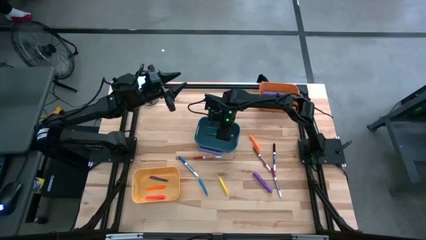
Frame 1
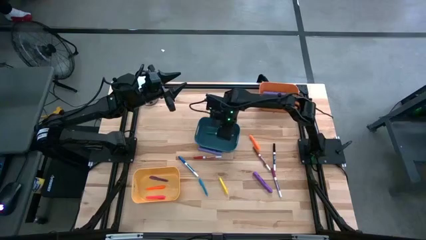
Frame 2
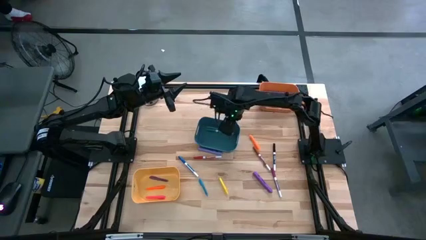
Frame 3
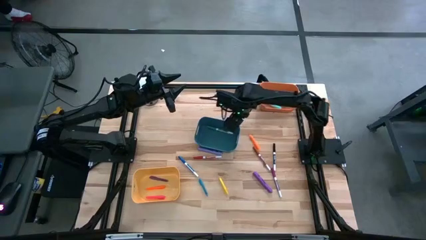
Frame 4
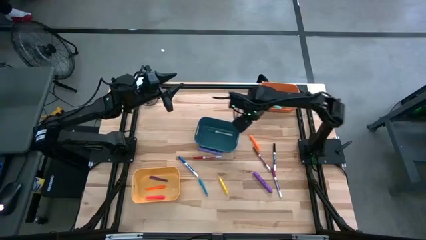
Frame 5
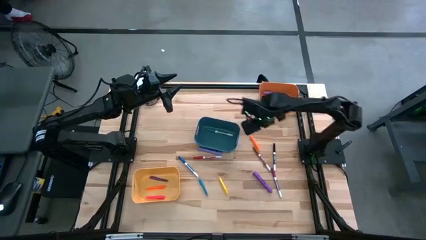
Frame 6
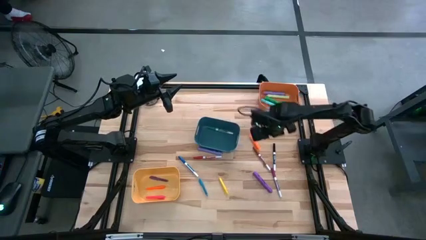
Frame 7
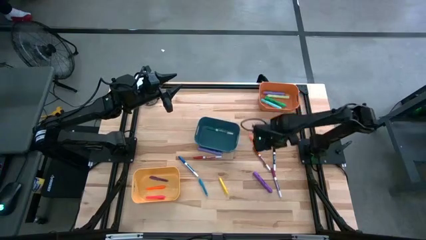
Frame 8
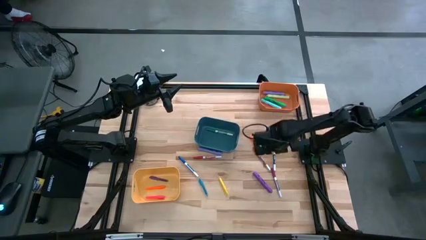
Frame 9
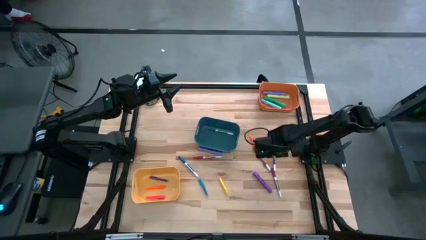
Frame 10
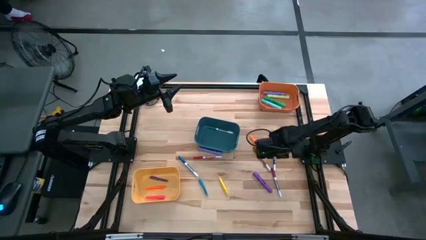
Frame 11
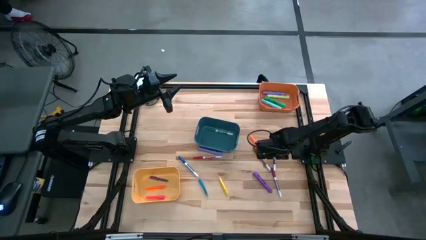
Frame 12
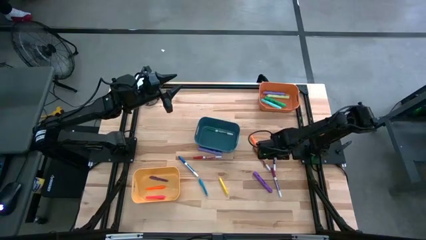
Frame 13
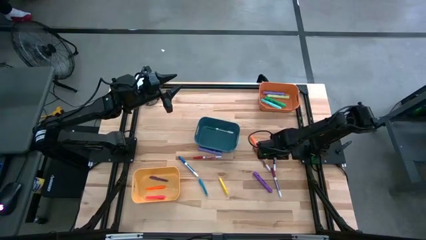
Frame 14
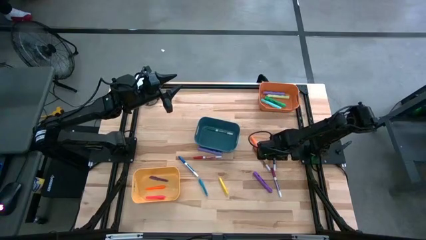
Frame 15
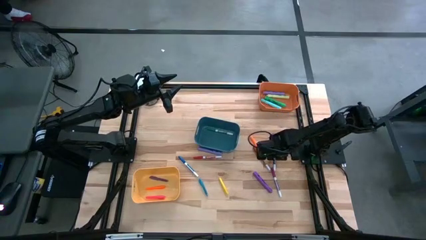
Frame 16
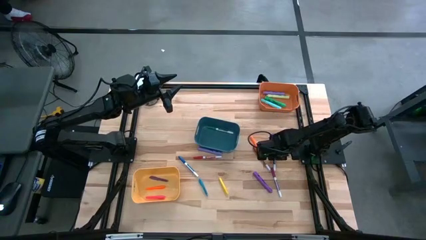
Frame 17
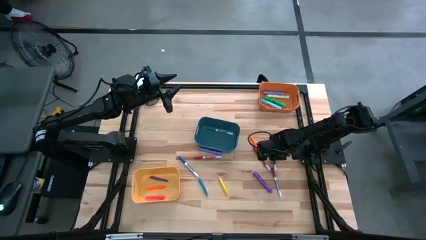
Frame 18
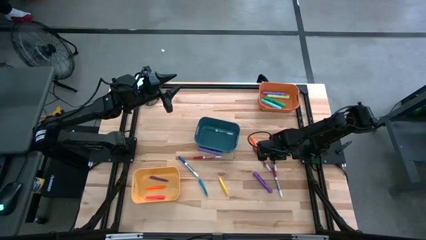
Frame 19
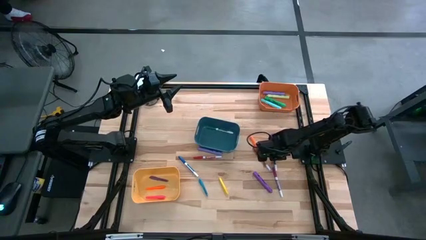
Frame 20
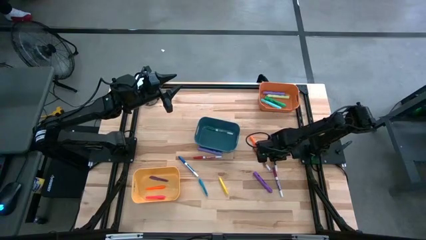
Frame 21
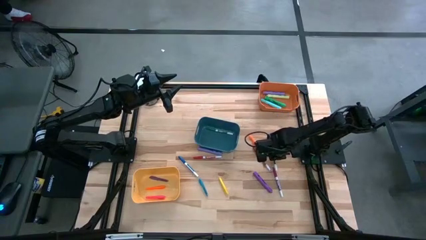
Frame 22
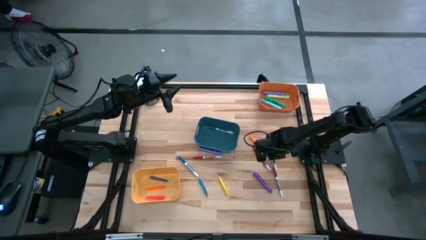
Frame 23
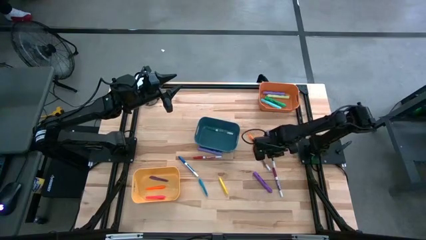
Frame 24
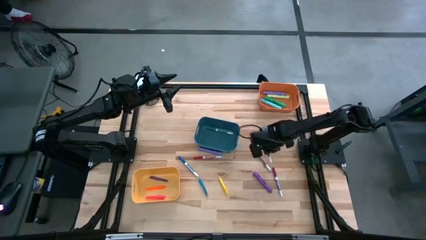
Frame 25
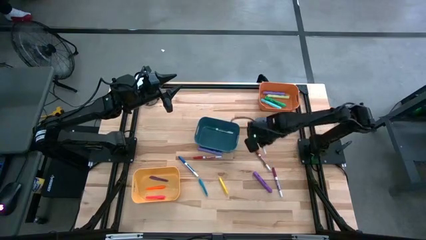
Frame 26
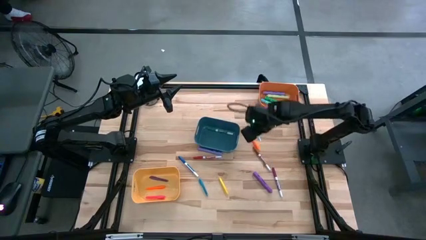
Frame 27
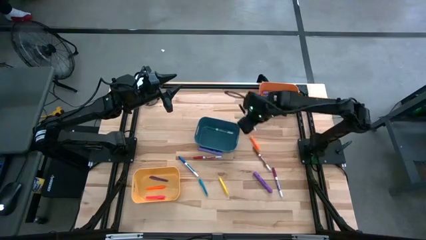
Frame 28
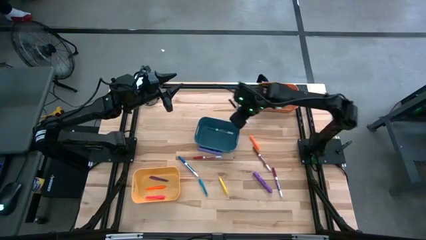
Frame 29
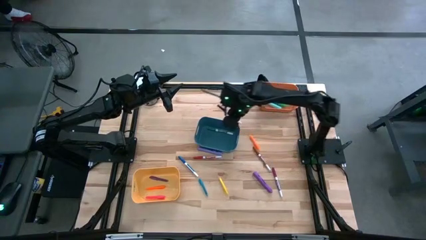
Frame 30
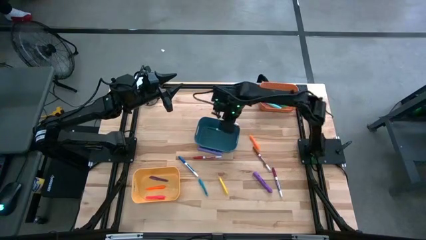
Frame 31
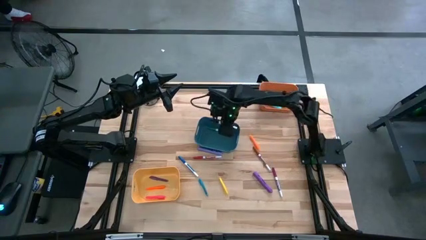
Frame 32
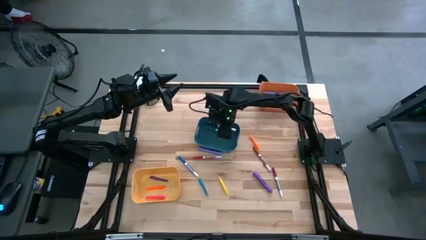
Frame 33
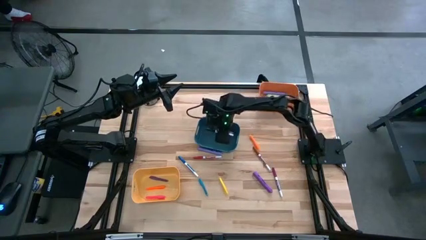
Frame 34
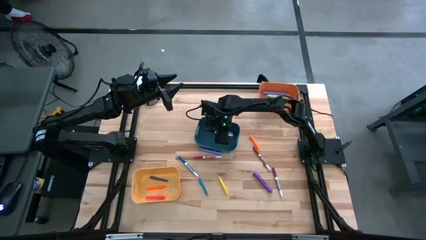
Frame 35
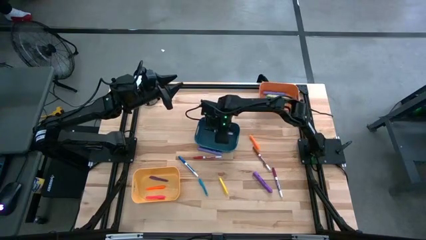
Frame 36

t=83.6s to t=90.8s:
Task: Pick & Place Markers
Put the black marker pen into the blue bin

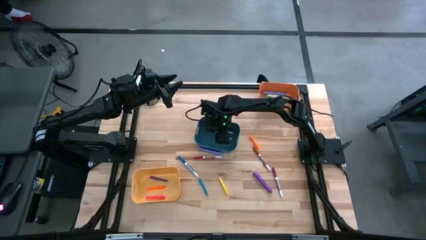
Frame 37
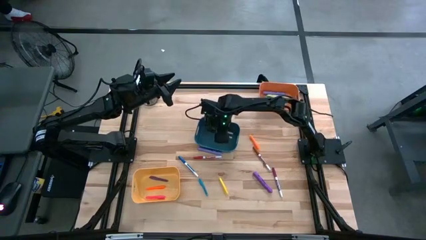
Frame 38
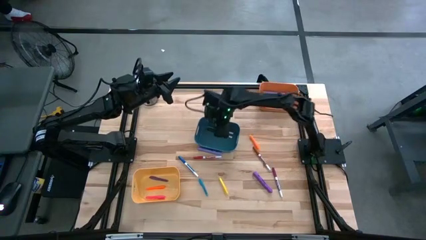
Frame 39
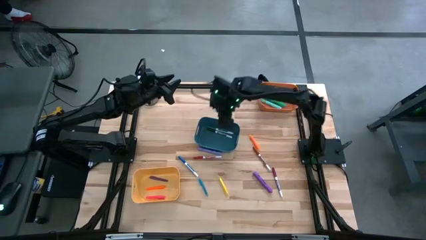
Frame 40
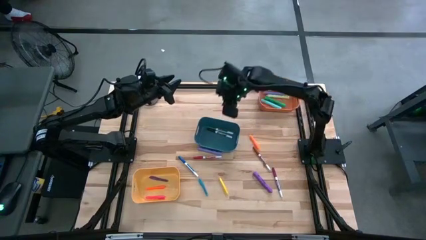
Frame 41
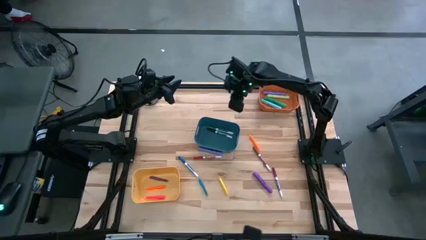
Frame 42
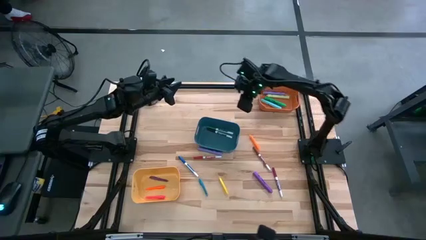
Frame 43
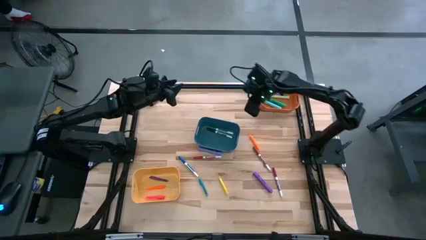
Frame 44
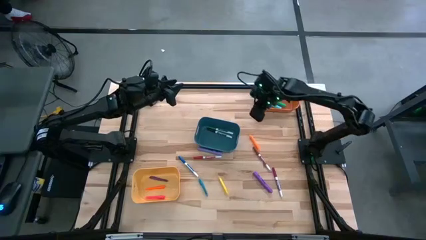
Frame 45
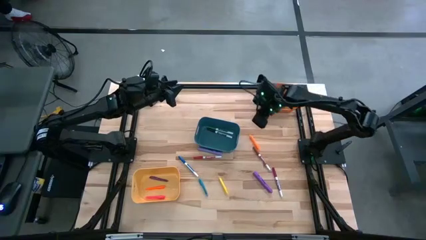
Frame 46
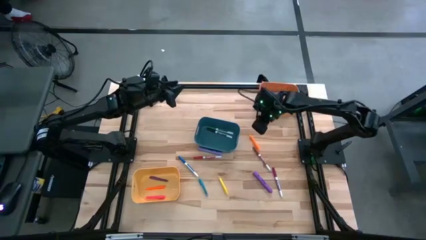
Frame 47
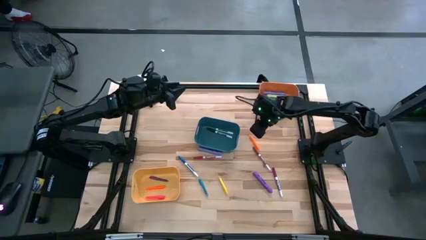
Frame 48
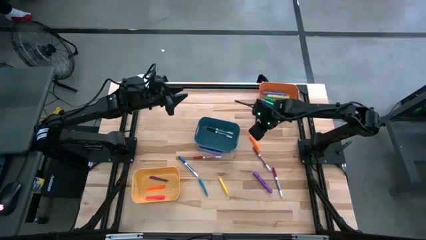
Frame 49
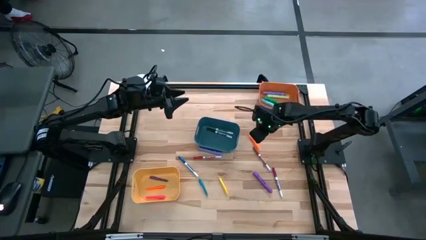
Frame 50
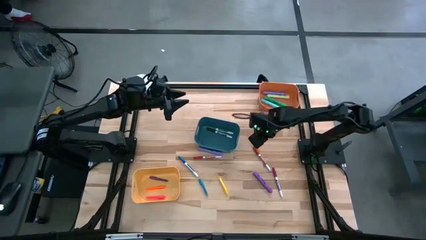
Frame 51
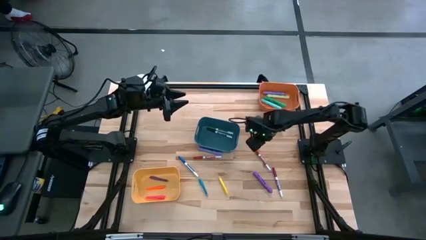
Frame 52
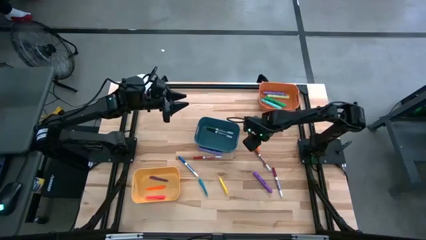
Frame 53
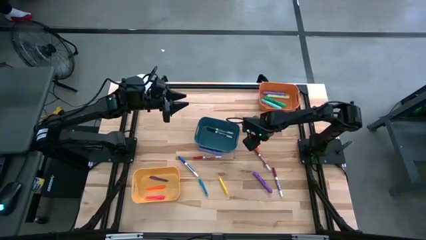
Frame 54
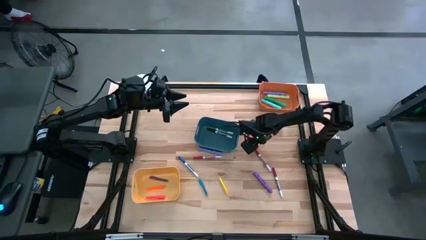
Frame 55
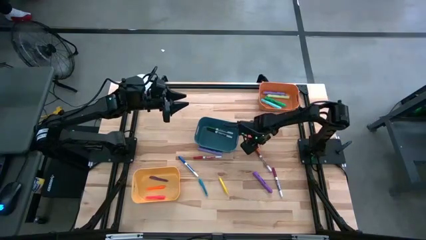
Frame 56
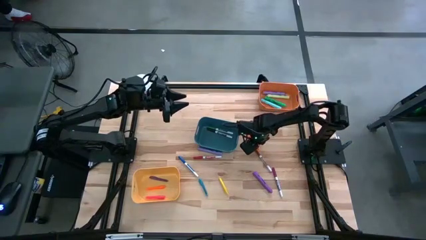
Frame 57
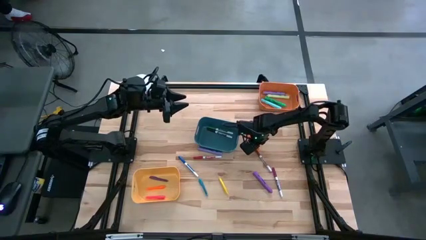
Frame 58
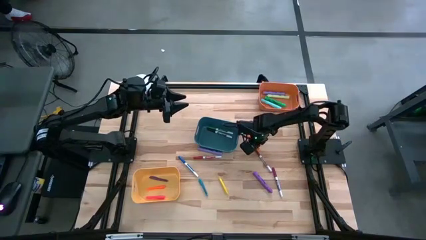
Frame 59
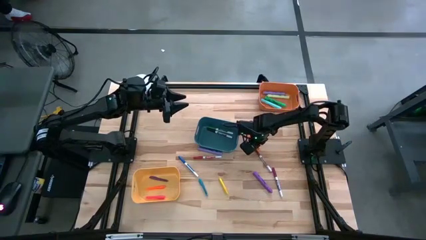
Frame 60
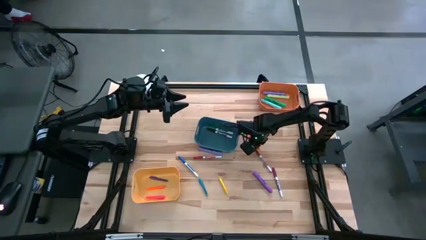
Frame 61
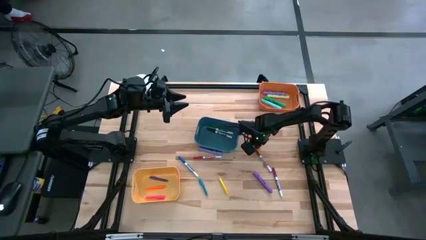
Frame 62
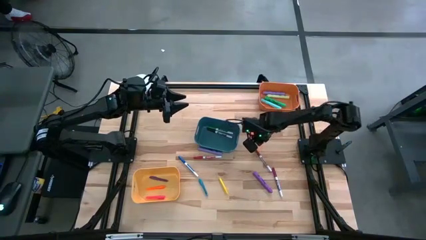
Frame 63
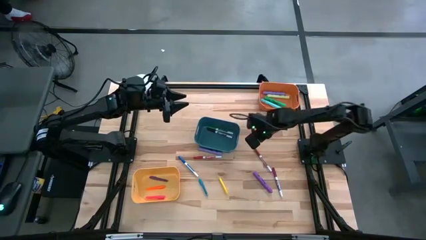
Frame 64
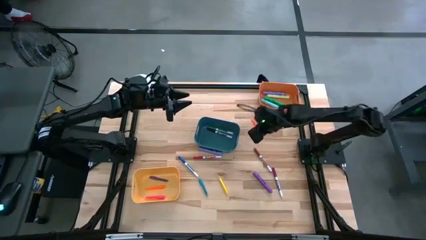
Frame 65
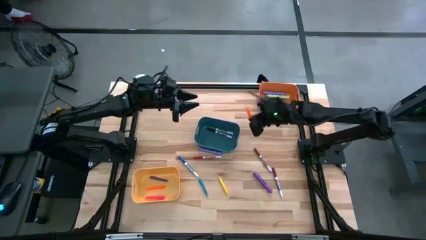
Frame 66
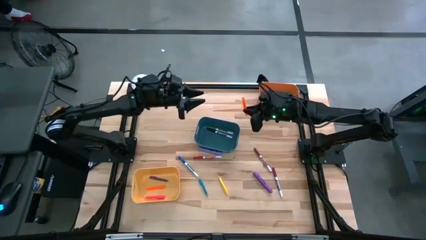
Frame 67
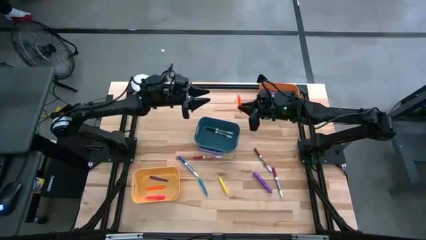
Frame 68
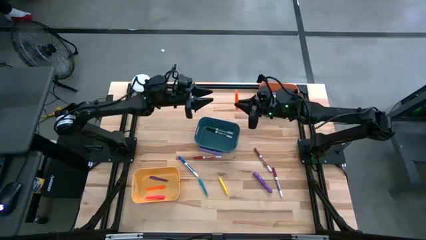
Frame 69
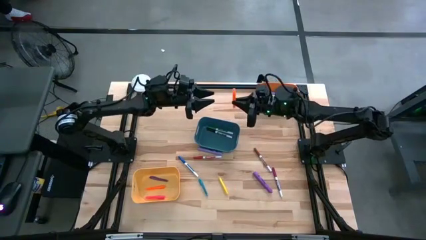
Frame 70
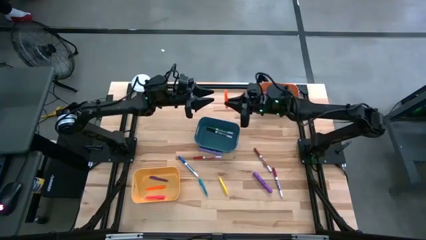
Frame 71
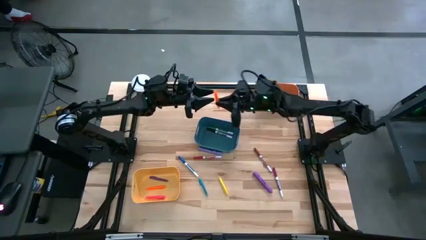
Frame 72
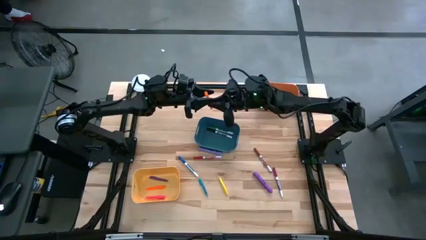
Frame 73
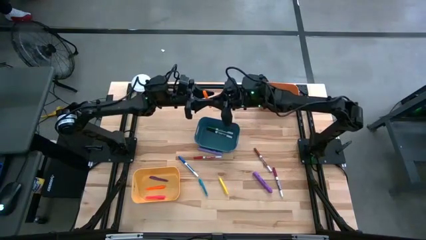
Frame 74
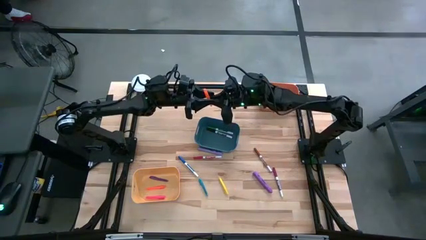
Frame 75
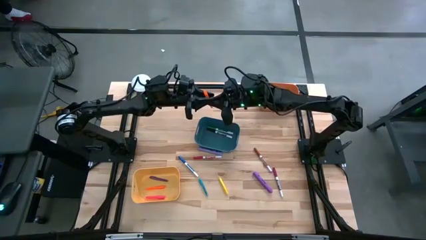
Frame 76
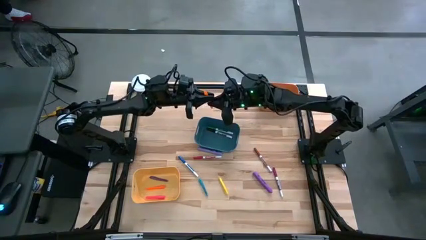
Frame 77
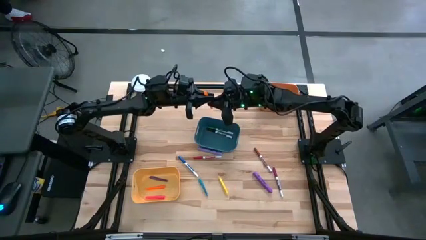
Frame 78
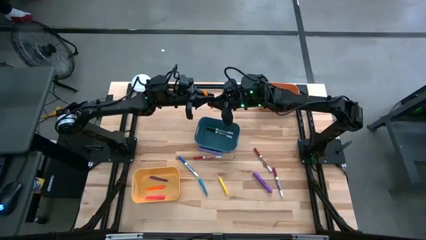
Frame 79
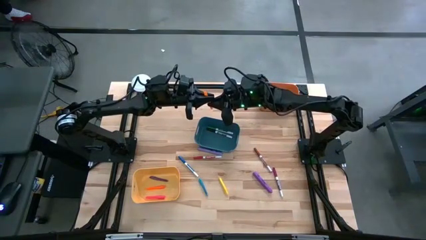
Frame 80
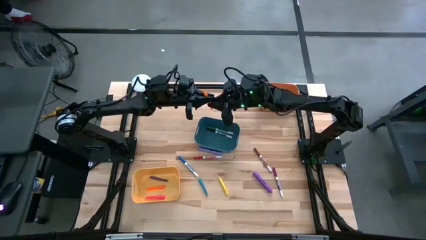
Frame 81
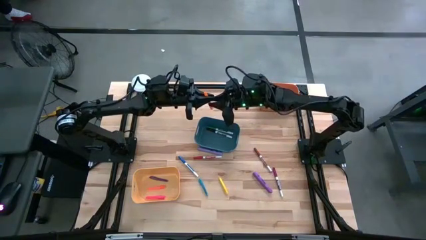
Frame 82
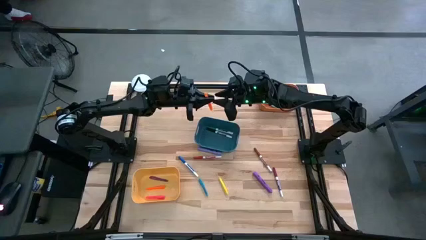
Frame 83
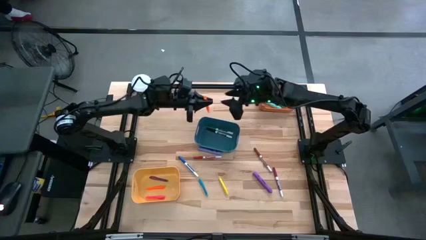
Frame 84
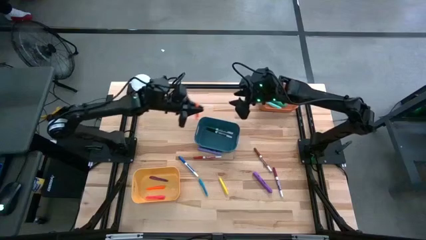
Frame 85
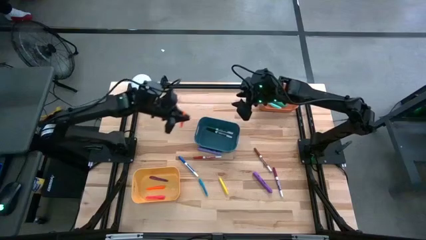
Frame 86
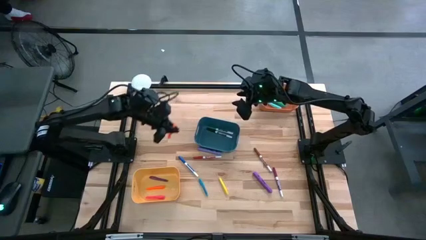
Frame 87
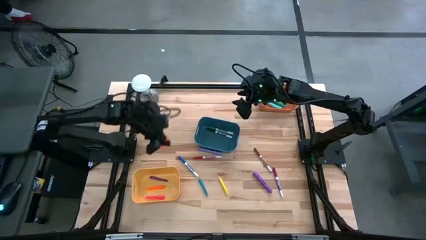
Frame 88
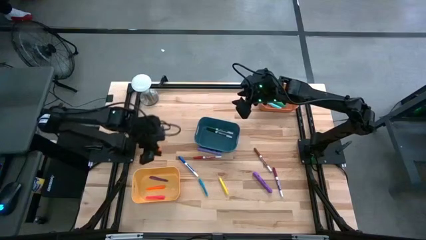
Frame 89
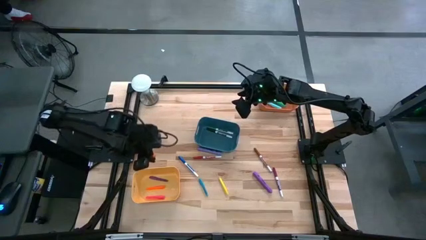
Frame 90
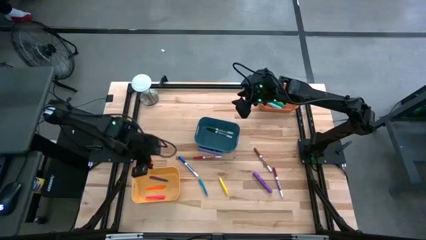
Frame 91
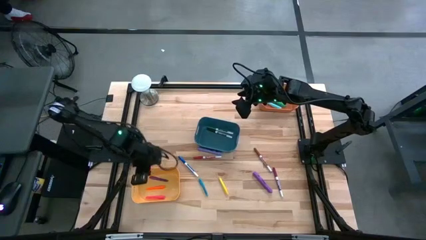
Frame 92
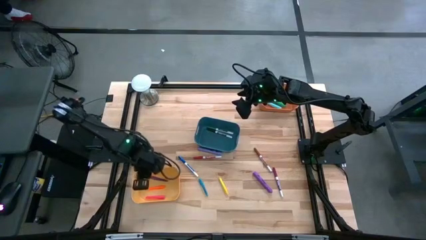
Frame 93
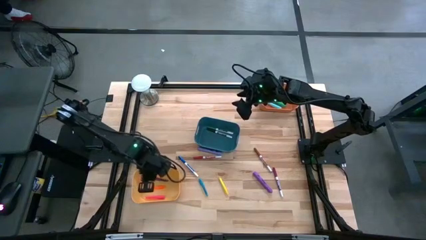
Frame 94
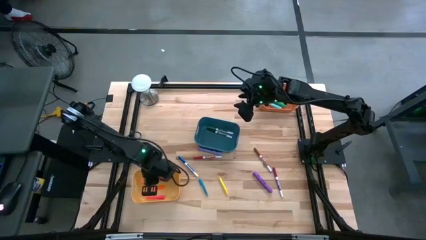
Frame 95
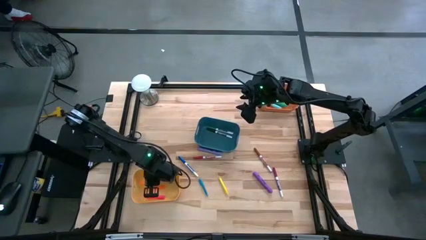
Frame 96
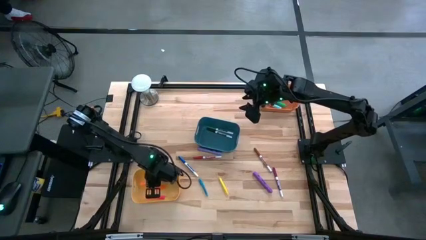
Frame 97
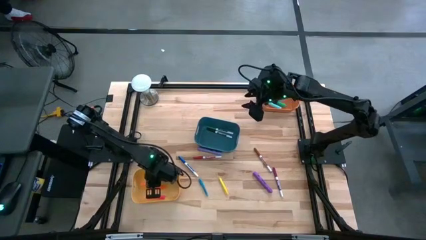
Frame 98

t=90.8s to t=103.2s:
Put the orange pen into the yellow bin
